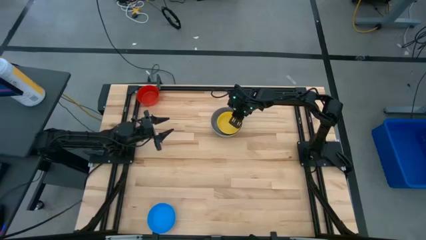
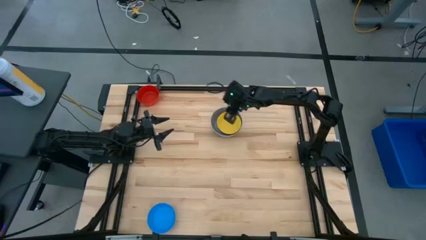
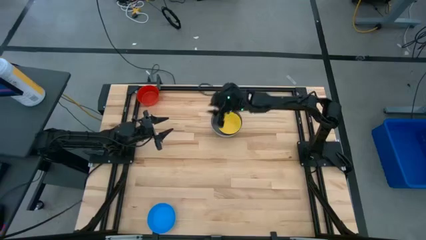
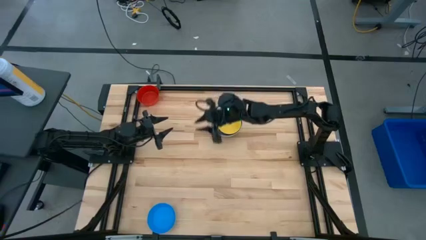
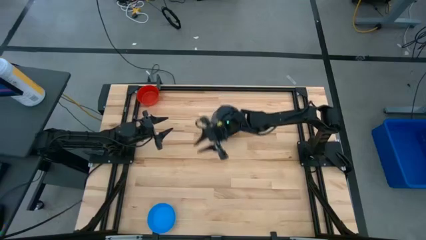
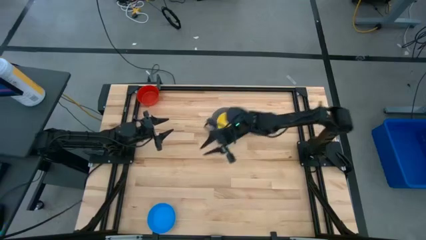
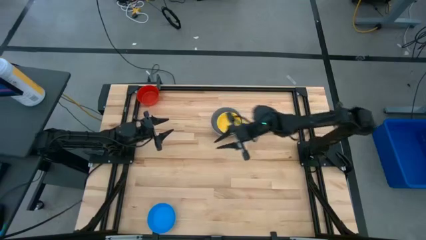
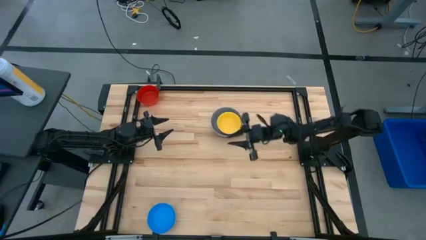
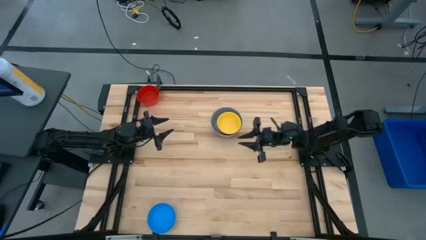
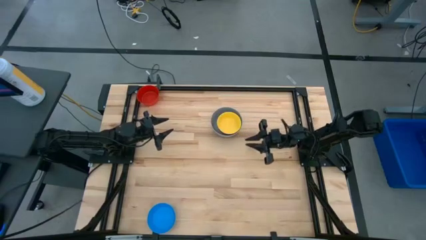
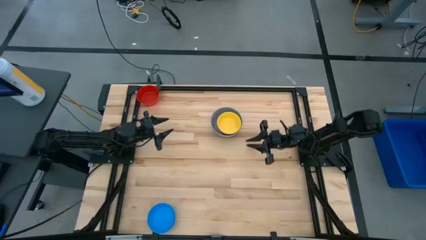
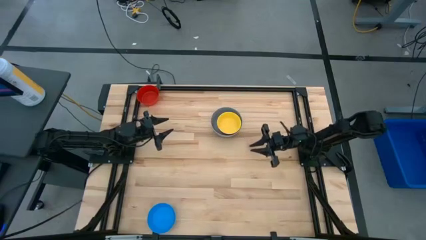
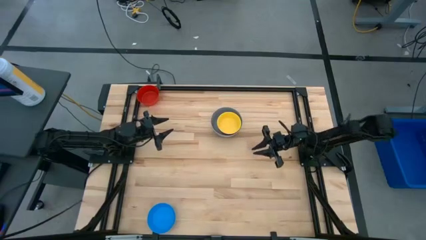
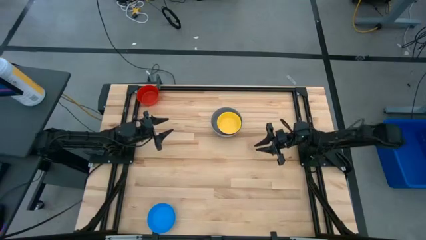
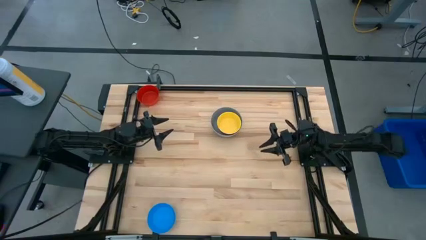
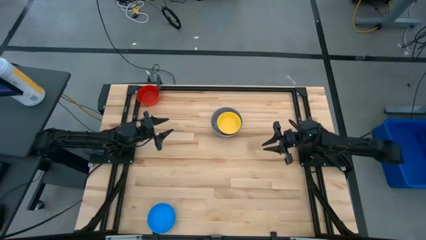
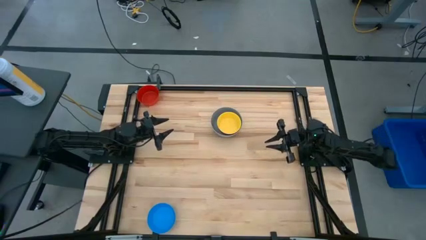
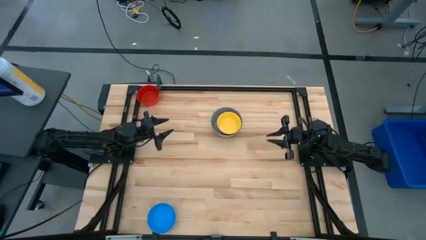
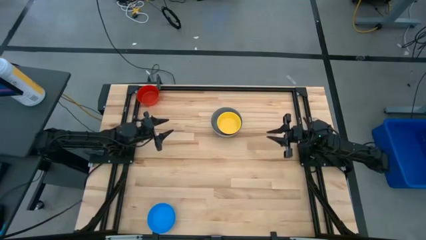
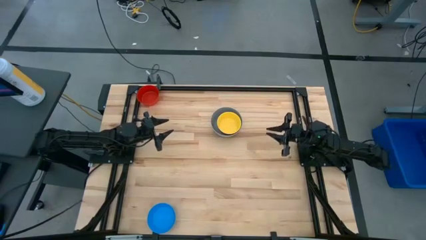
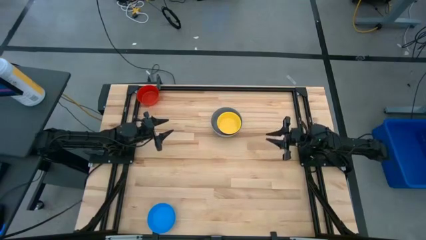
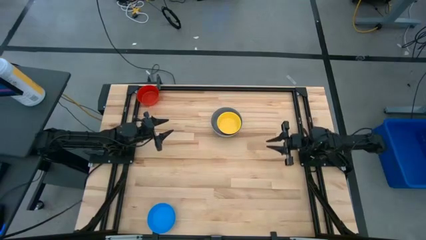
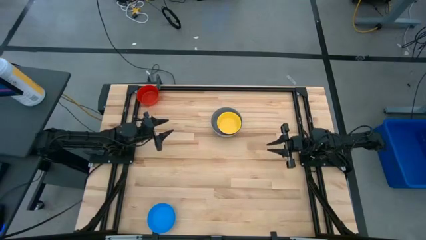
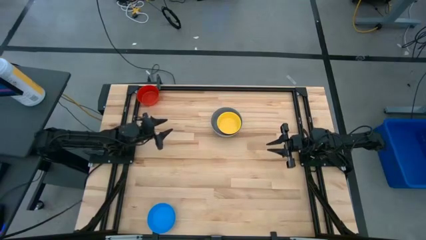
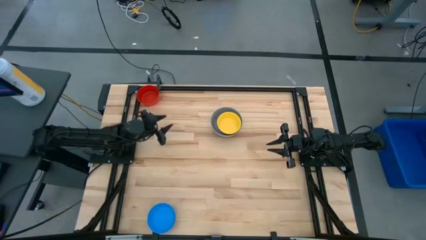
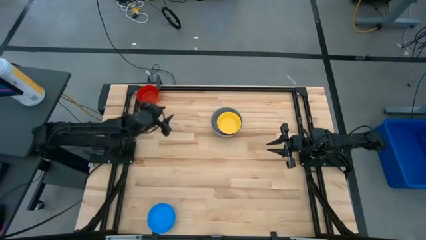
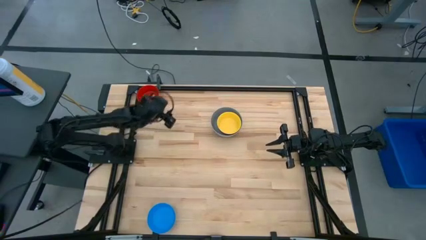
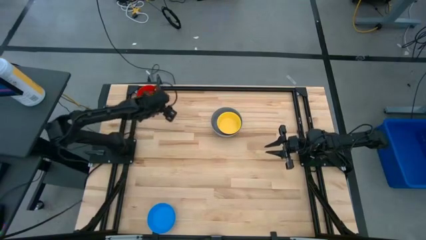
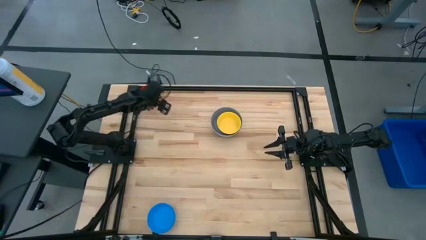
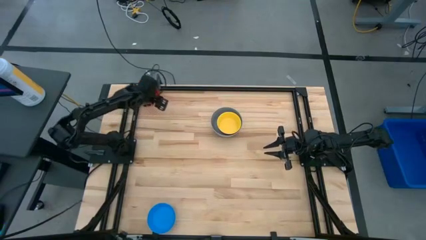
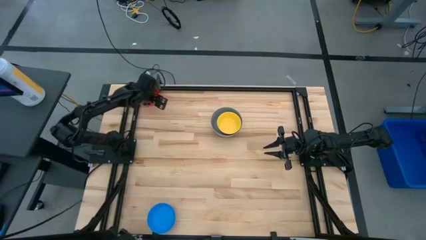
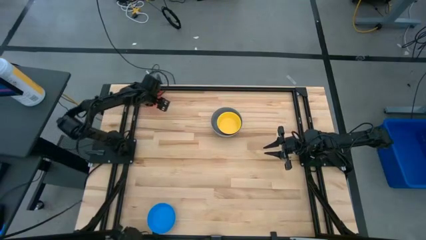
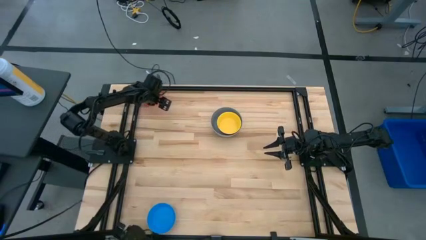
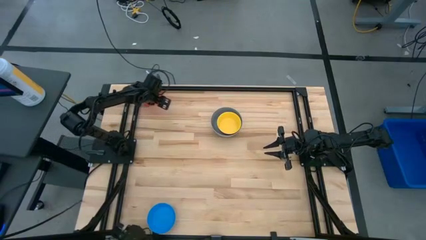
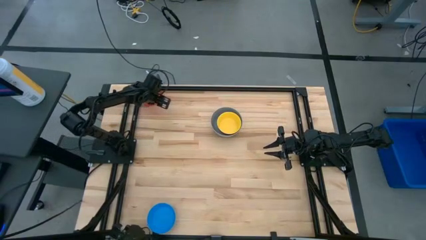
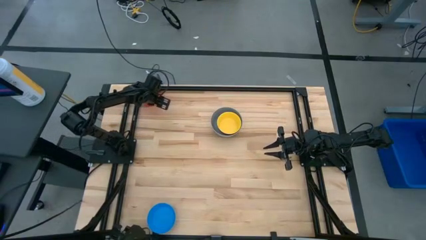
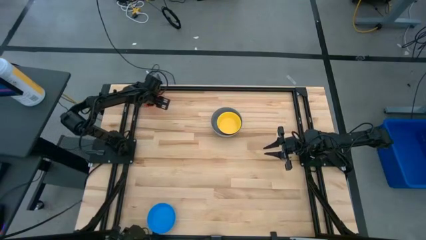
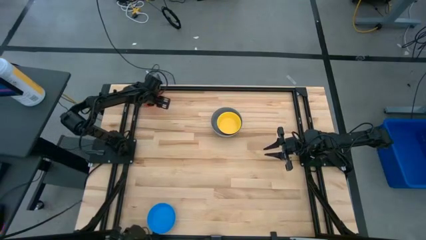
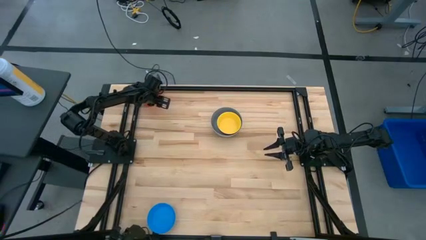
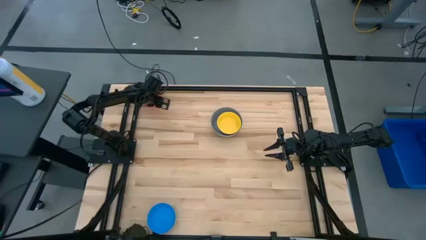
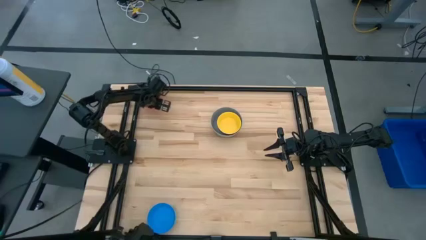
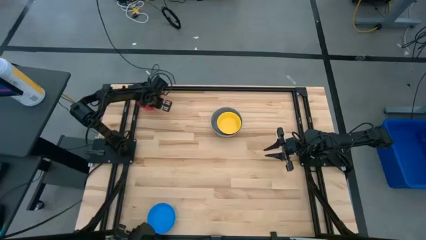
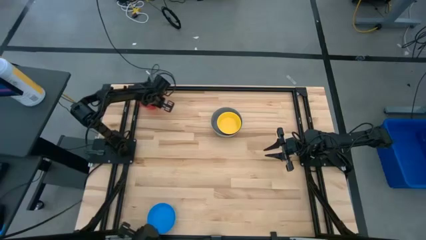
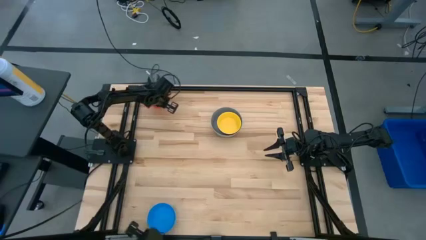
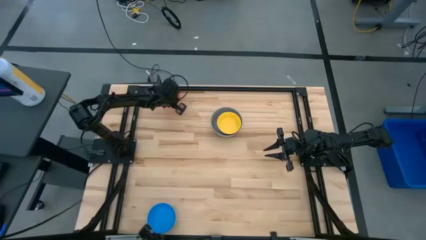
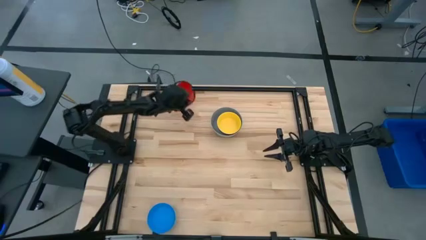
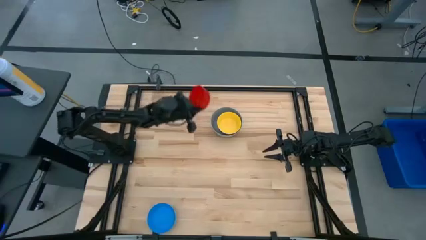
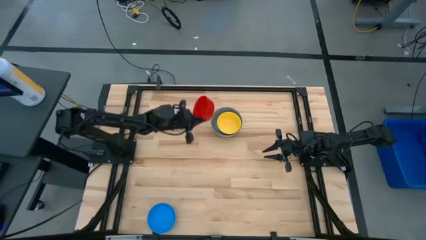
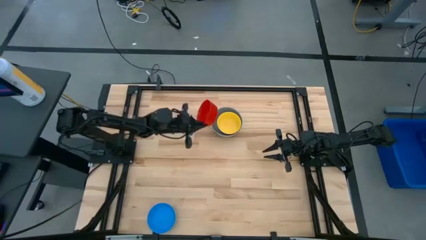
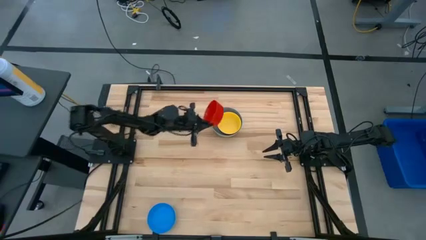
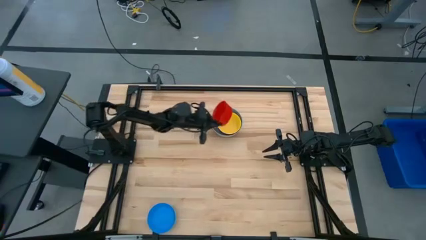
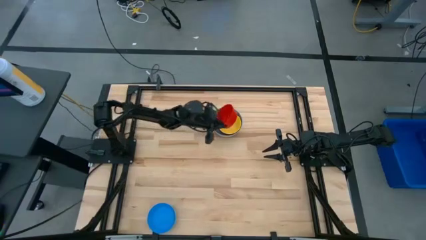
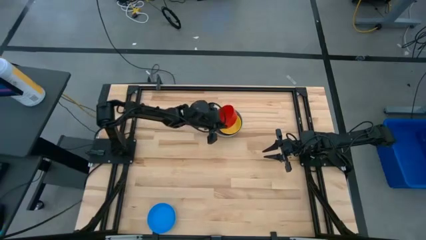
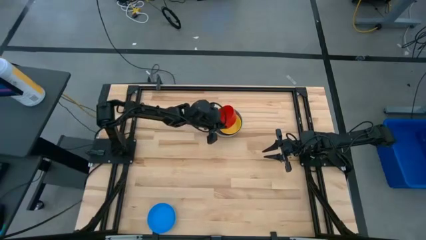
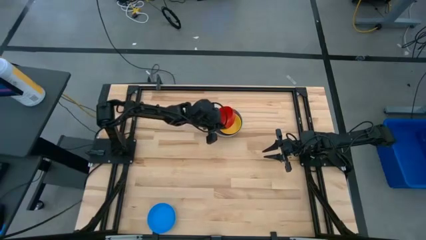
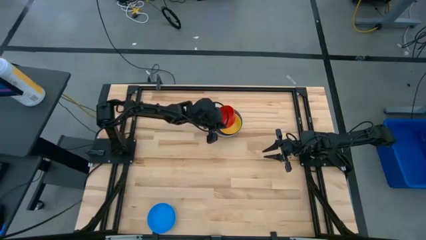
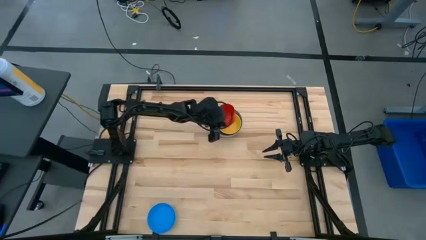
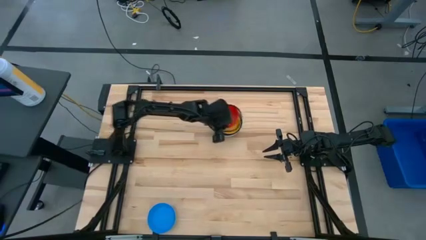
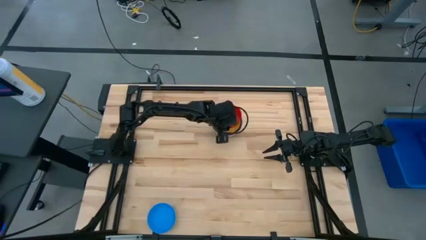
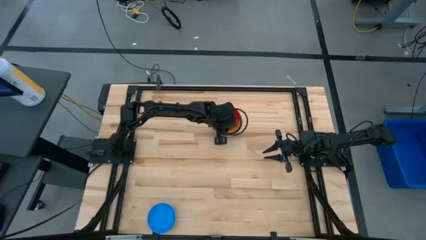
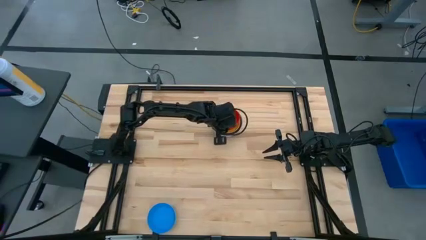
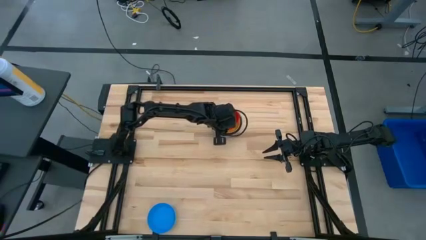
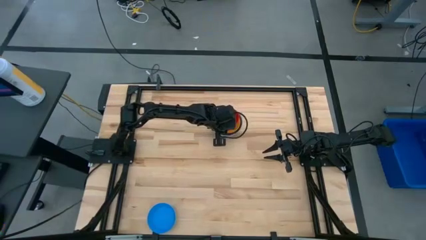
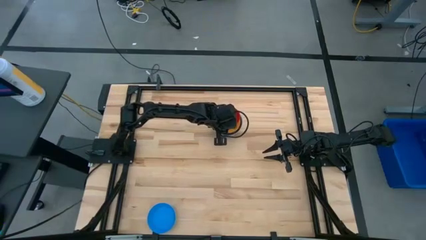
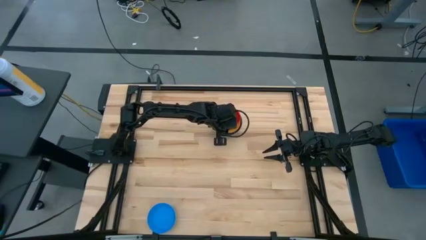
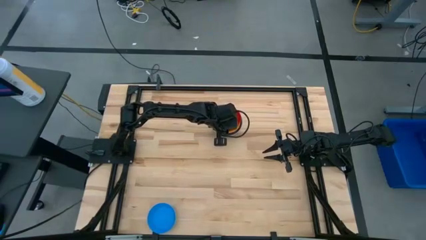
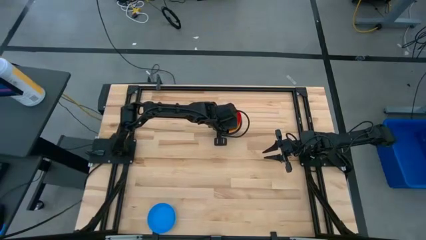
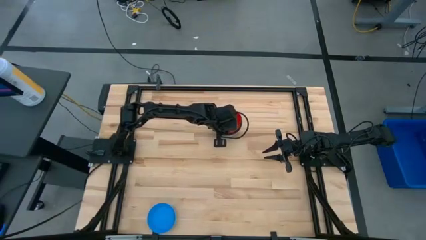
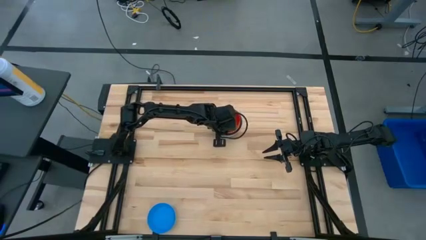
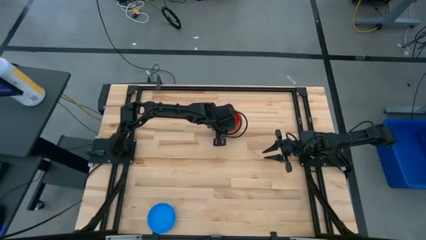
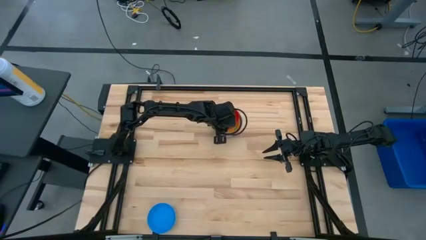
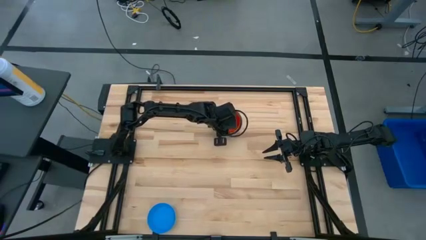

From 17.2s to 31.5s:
Stack the red bowl on top of the yellow bowl
